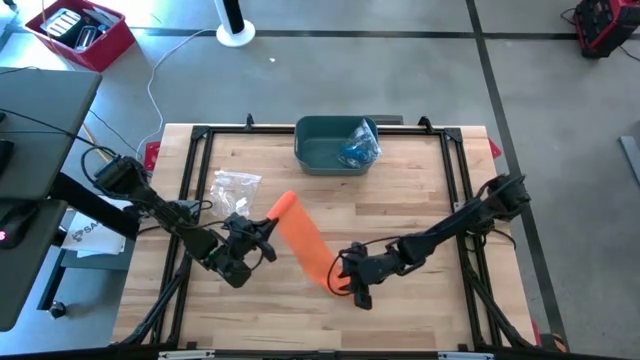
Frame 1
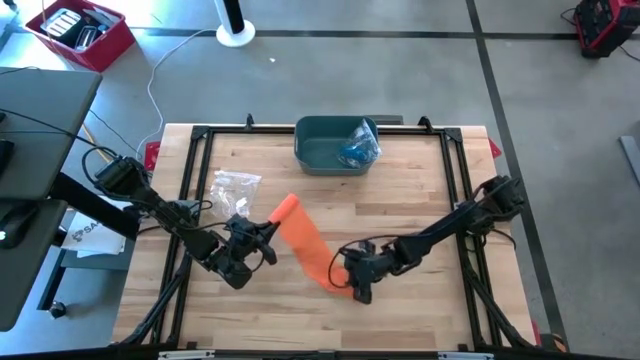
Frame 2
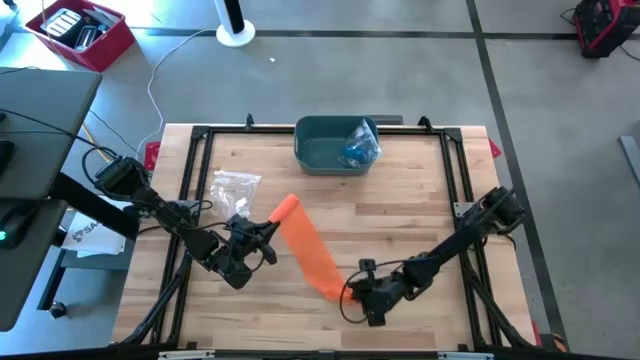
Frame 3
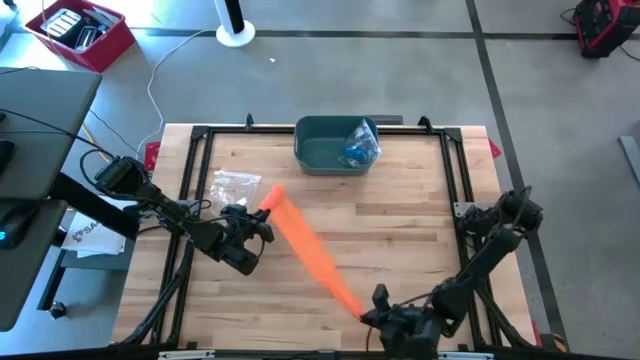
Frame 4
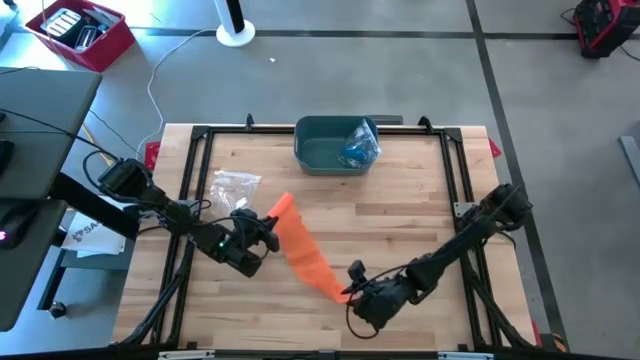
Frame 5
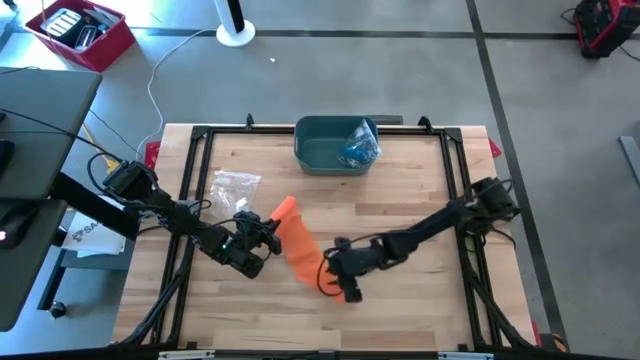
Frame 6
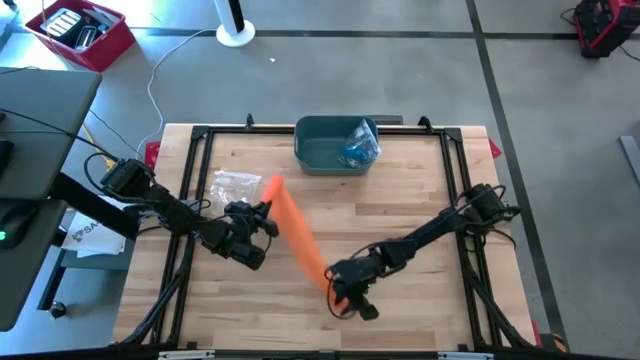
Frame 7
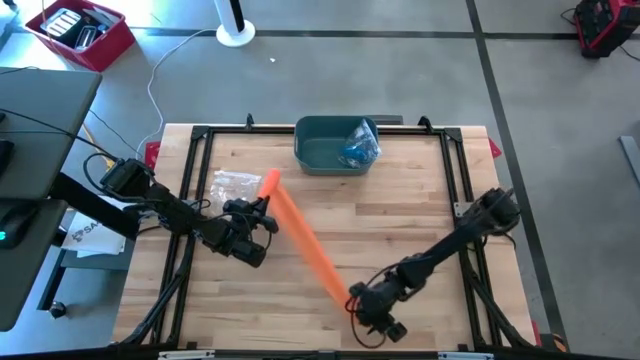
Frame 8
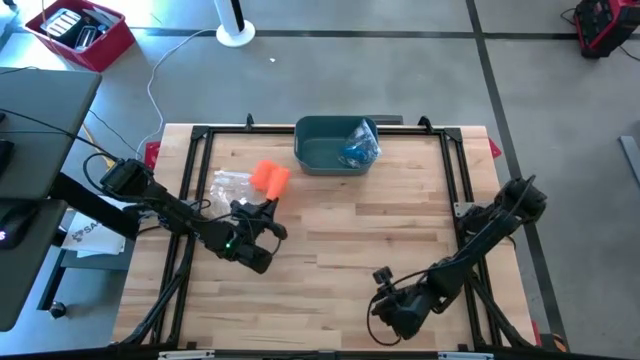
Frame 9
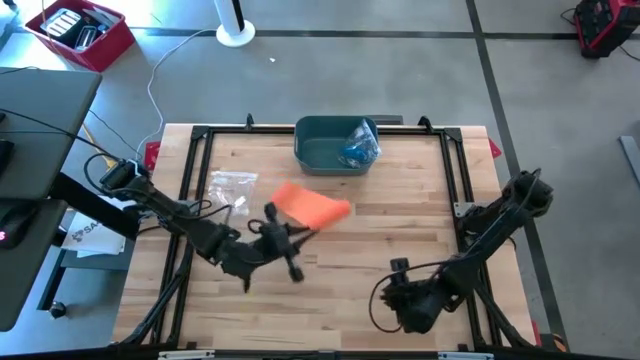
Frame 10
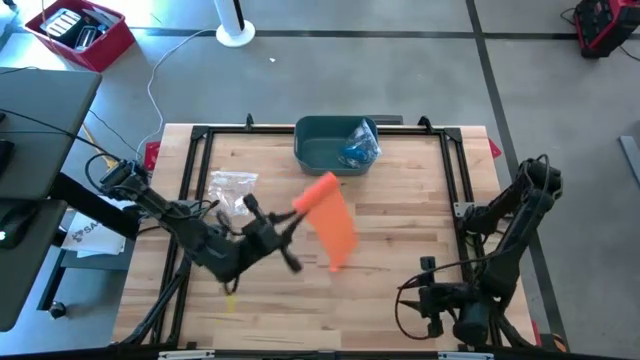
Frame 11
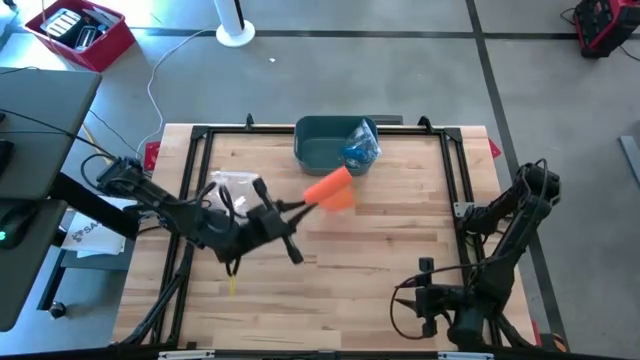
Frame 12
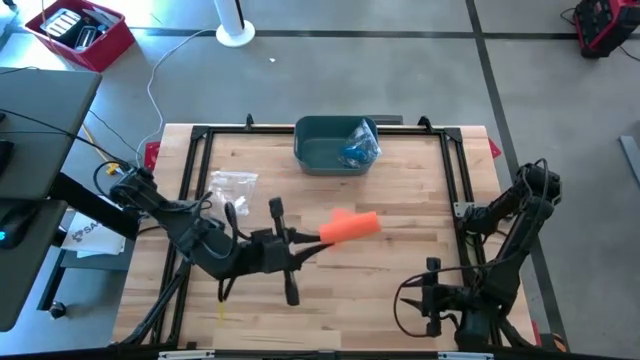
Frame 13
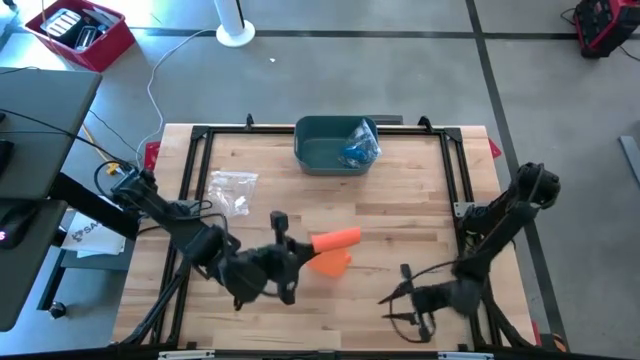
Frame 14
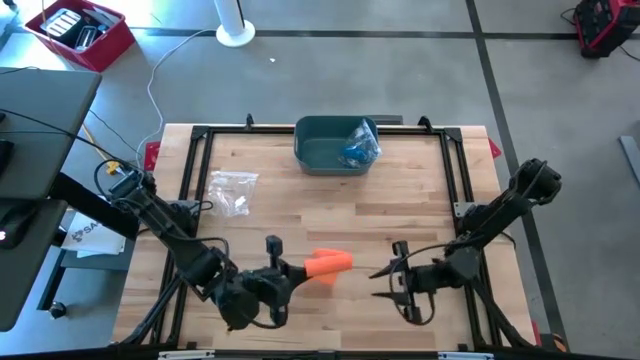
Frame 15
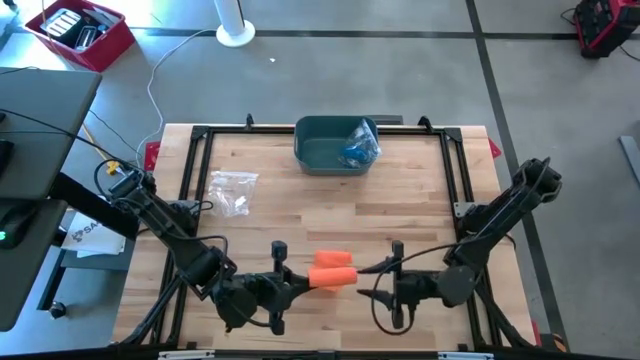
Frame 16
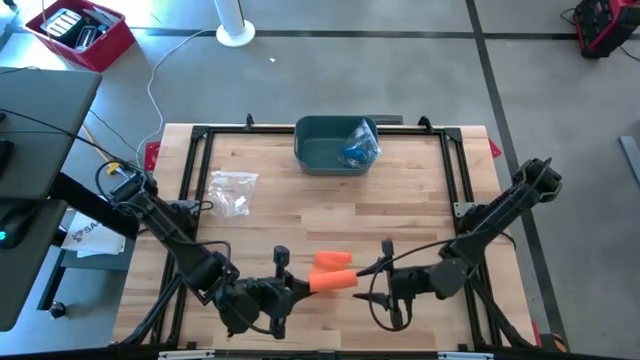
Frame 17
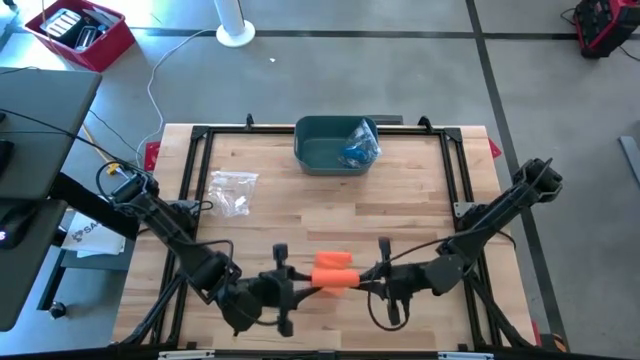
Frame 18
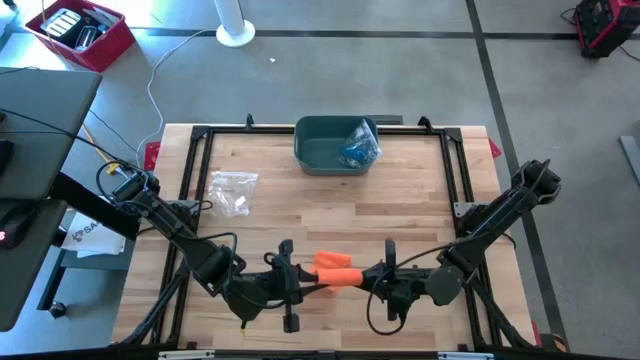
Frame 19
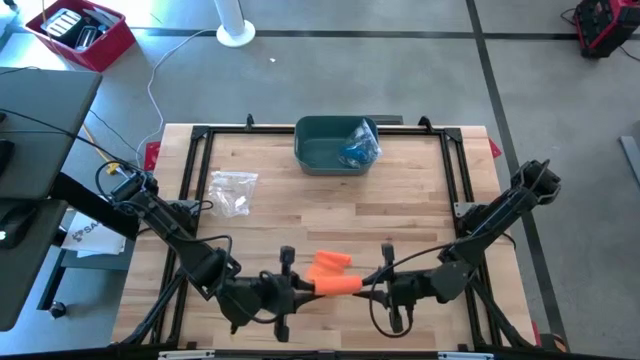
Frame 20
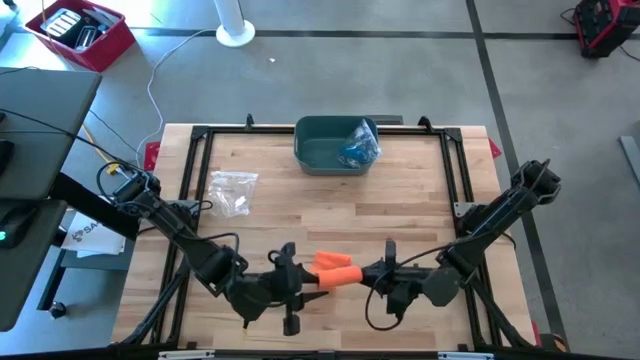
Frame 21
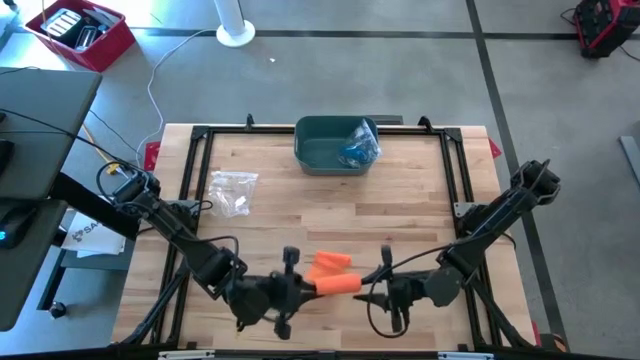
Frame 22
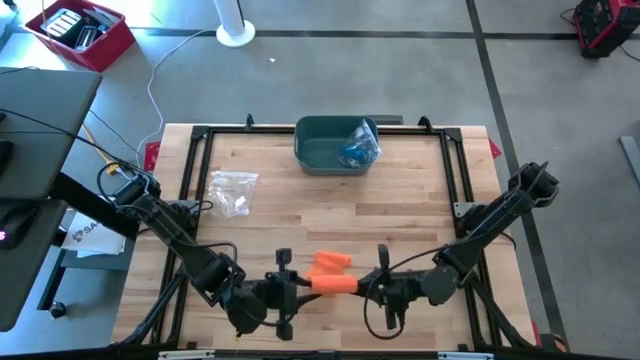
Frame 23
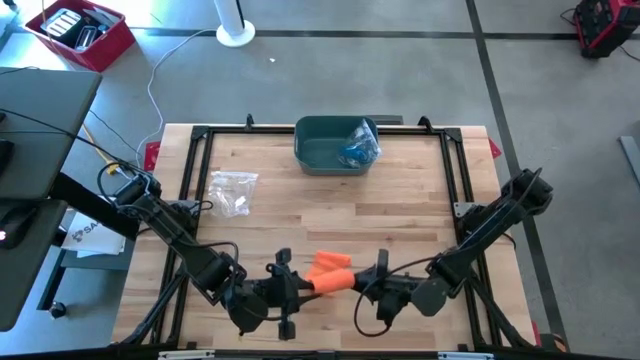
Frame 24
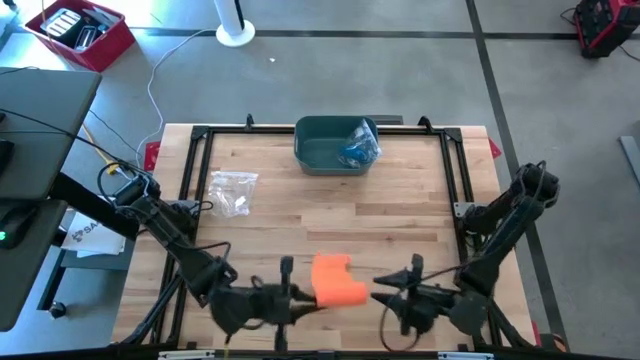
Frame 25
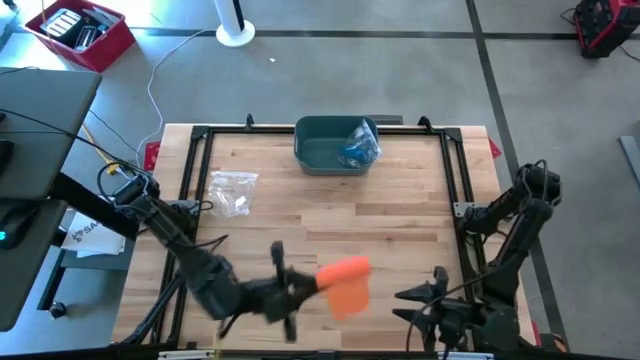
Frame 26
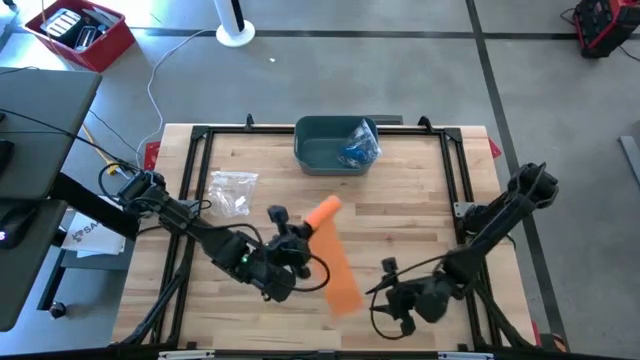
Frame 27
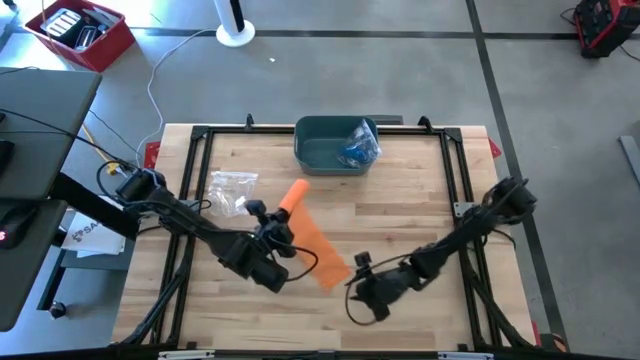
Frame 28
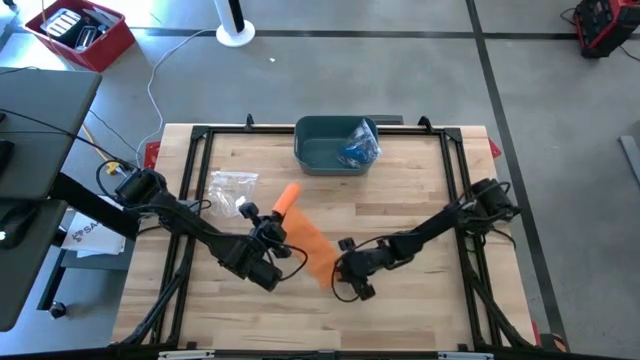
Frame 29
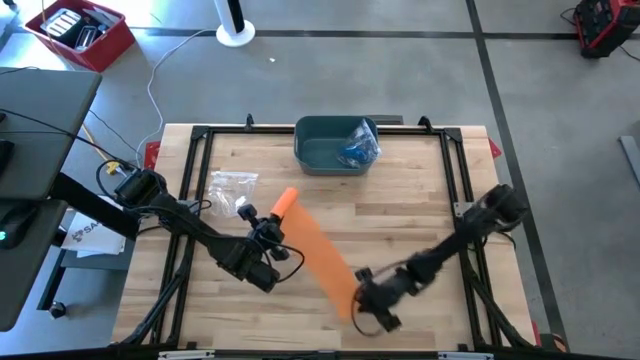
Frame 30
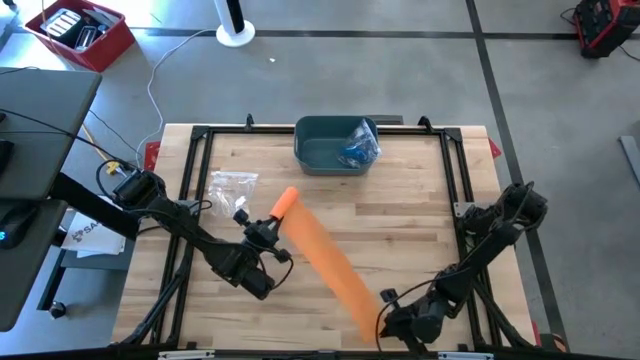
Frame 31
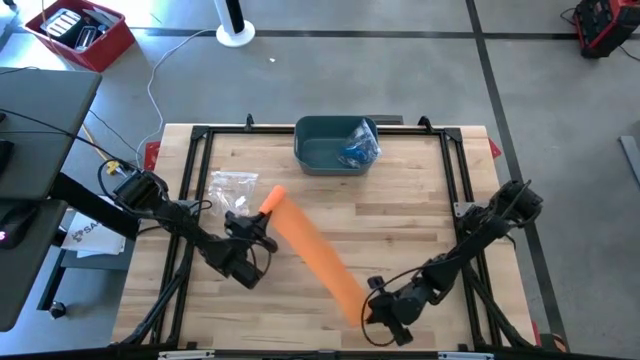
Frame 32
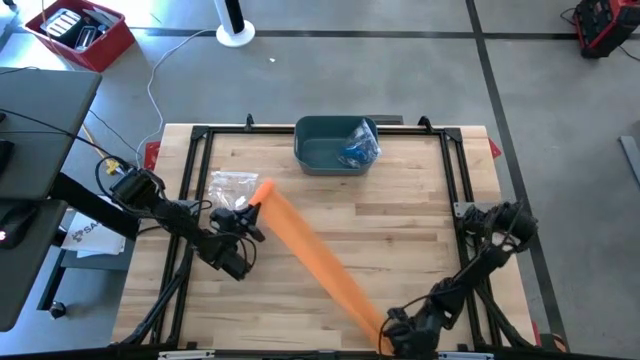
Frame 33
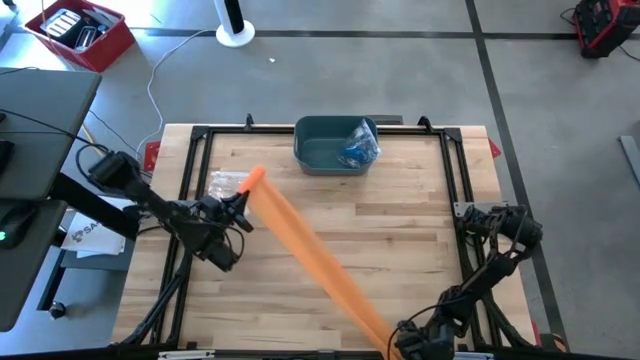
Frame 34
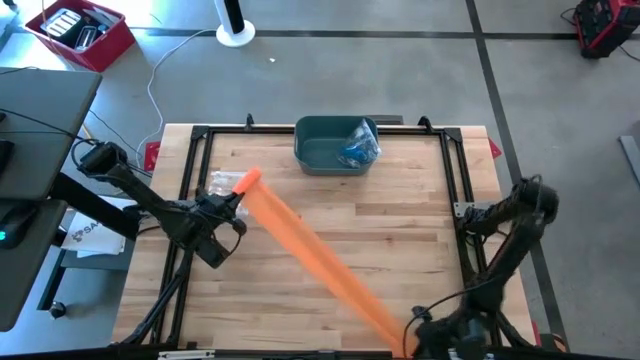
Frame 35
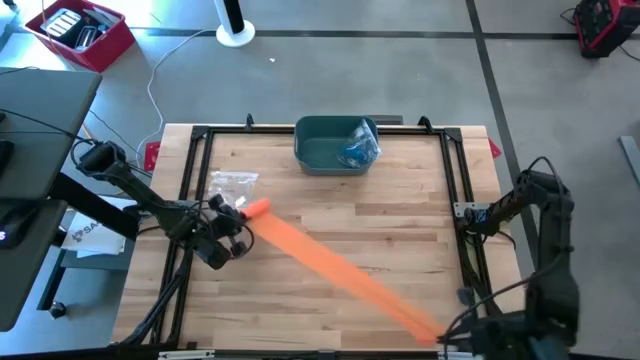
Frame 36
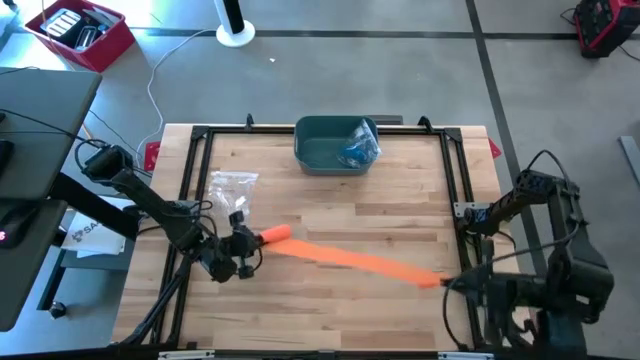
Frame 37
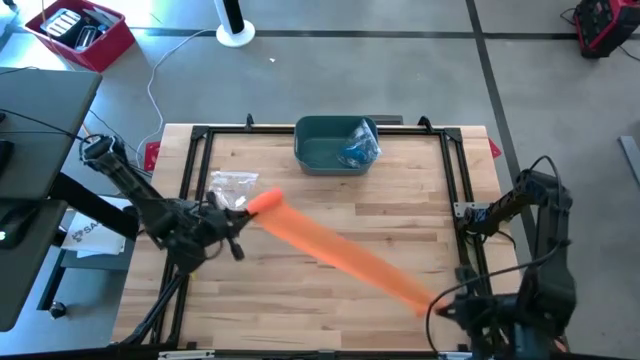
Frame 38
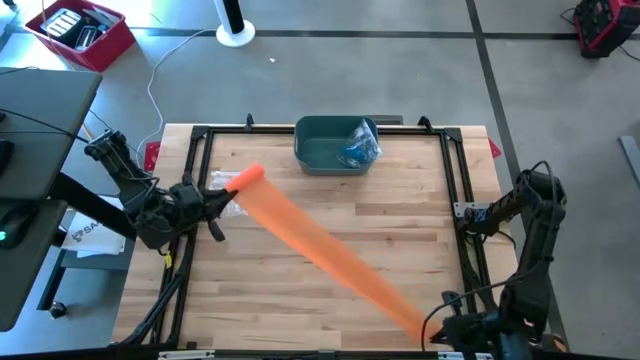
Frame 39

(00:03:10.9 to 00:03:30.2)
Task: Roll bandage
Roll the orange bandage
